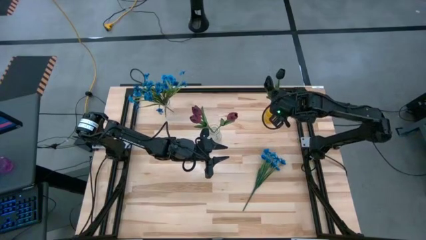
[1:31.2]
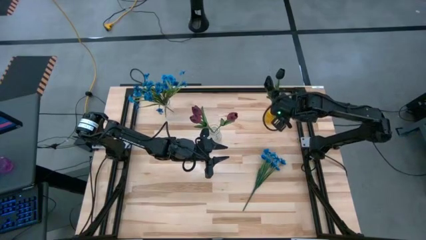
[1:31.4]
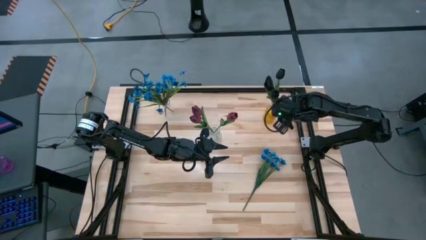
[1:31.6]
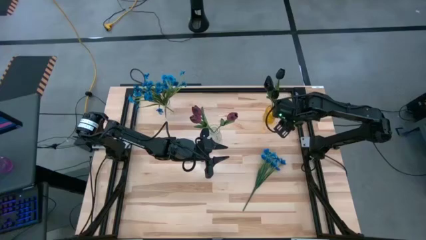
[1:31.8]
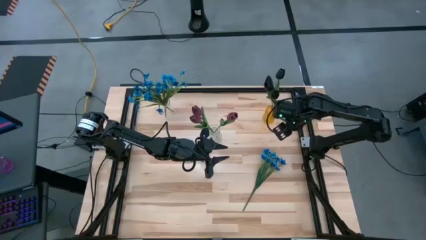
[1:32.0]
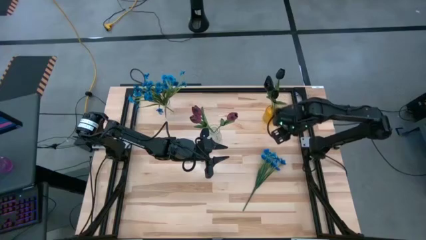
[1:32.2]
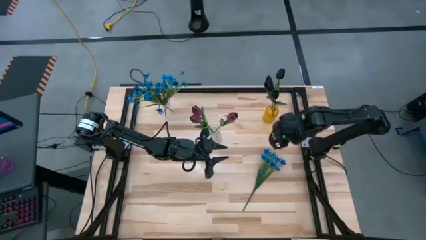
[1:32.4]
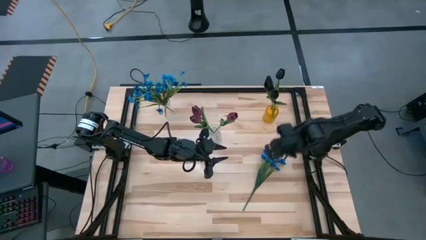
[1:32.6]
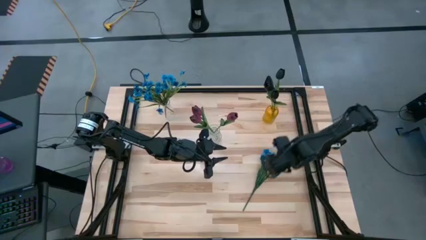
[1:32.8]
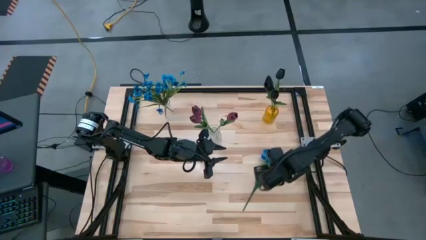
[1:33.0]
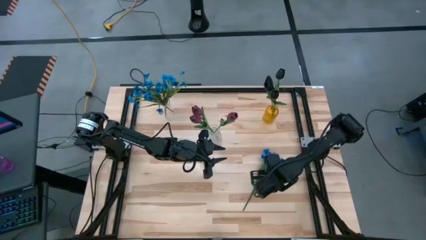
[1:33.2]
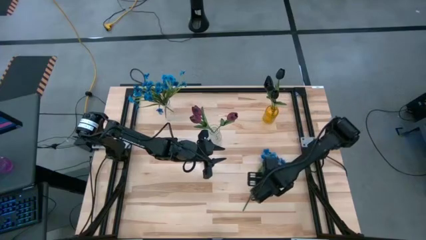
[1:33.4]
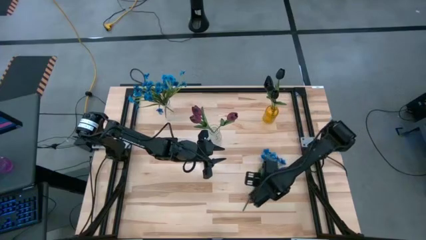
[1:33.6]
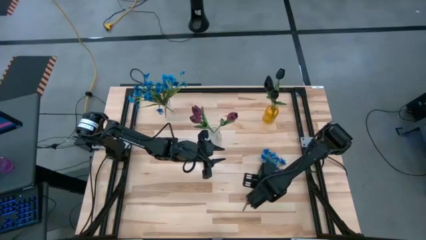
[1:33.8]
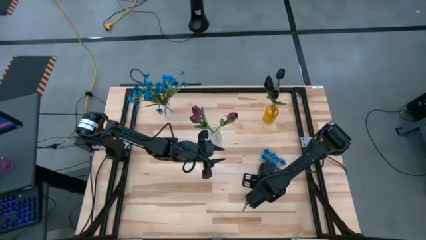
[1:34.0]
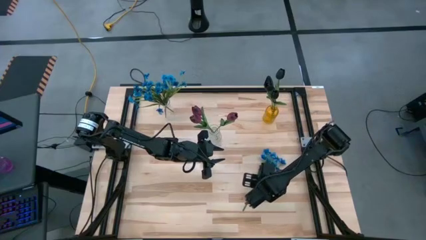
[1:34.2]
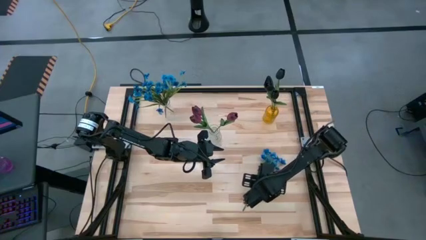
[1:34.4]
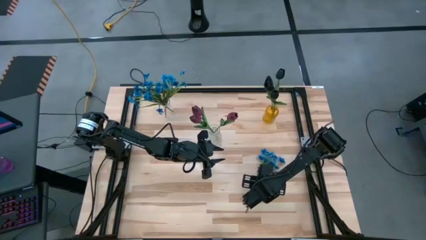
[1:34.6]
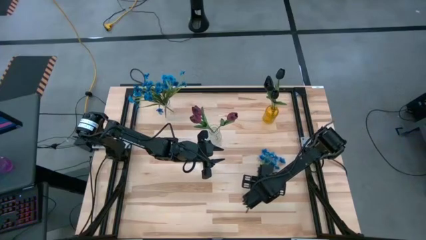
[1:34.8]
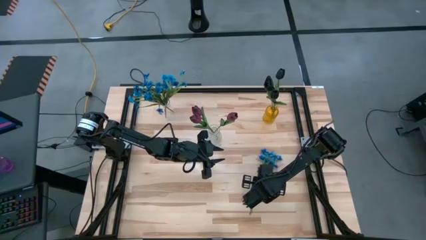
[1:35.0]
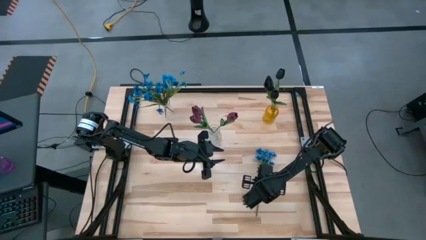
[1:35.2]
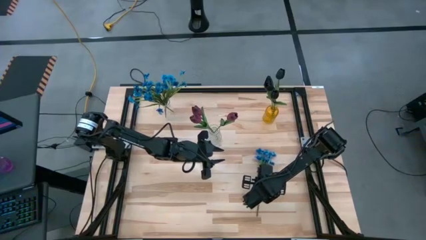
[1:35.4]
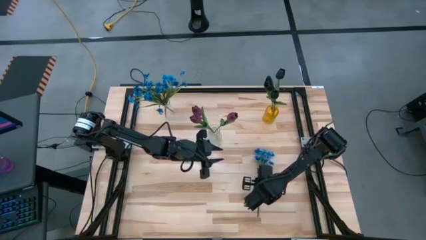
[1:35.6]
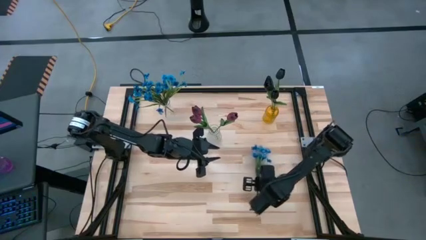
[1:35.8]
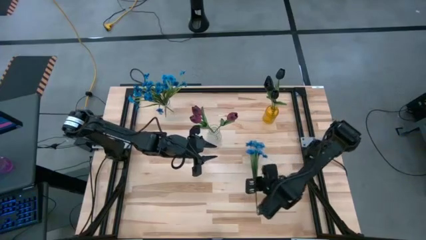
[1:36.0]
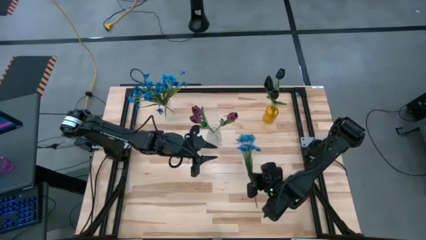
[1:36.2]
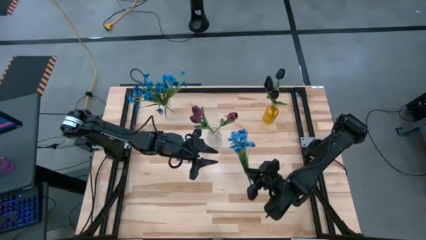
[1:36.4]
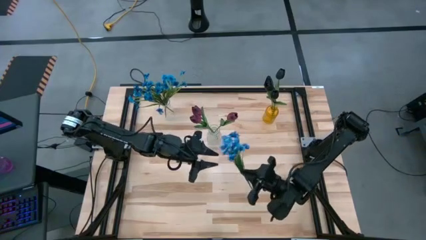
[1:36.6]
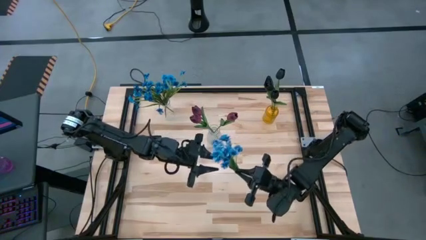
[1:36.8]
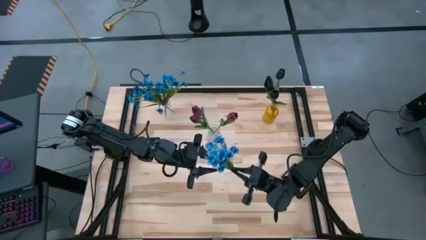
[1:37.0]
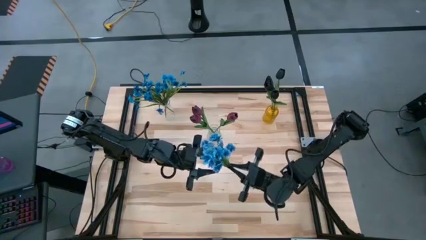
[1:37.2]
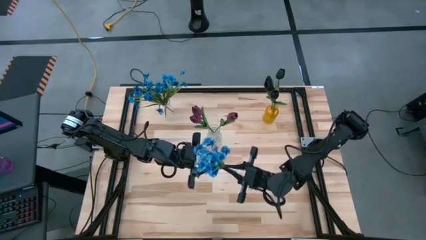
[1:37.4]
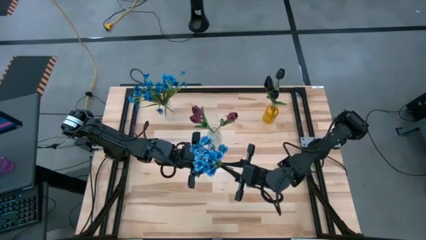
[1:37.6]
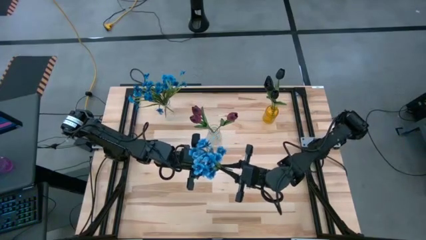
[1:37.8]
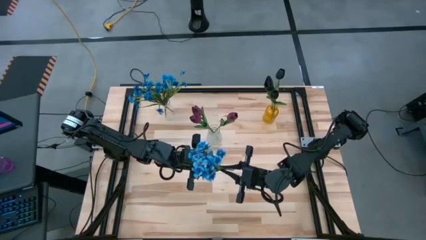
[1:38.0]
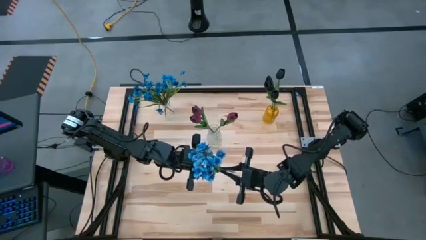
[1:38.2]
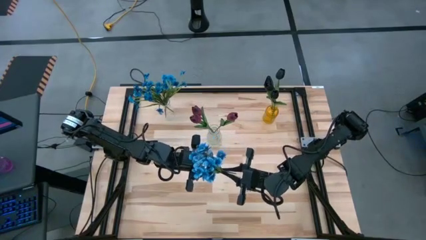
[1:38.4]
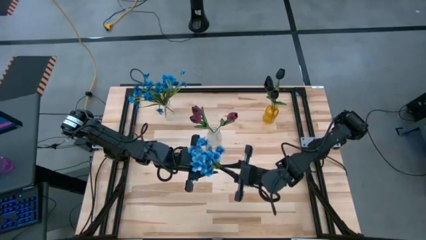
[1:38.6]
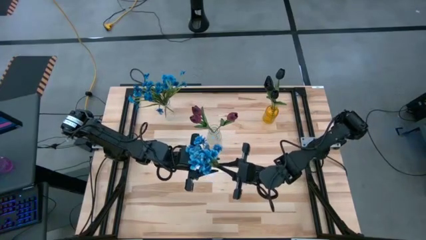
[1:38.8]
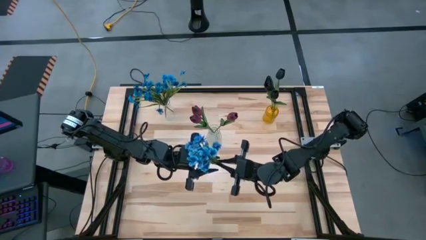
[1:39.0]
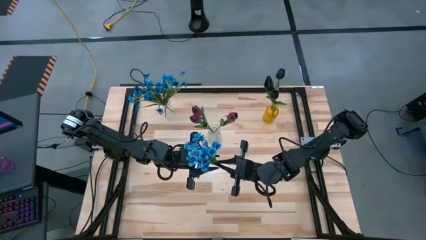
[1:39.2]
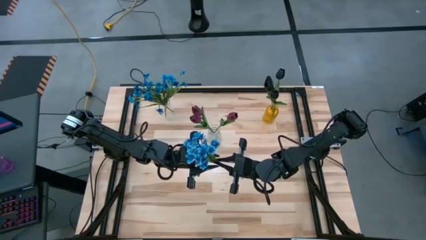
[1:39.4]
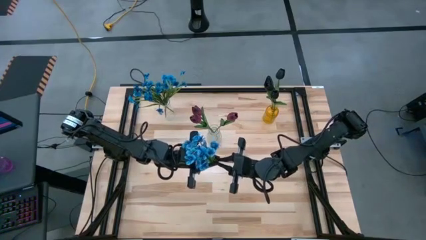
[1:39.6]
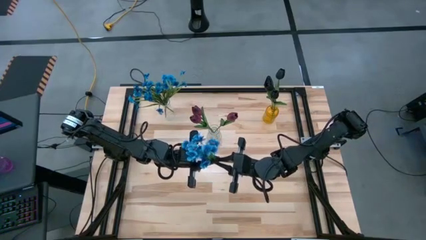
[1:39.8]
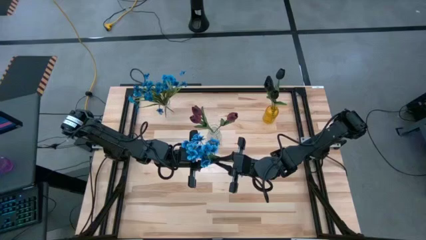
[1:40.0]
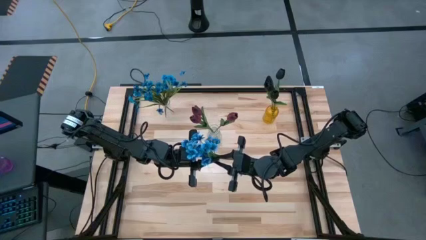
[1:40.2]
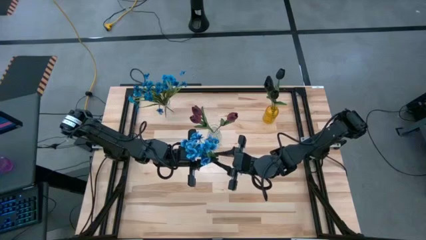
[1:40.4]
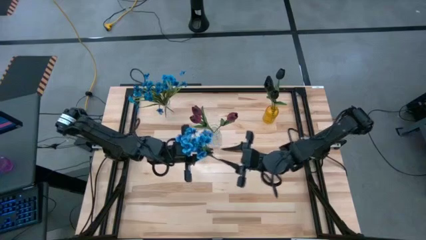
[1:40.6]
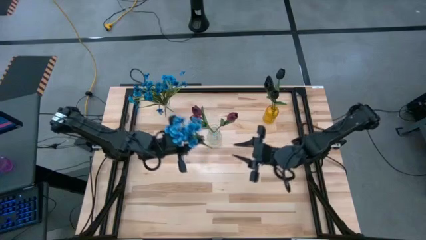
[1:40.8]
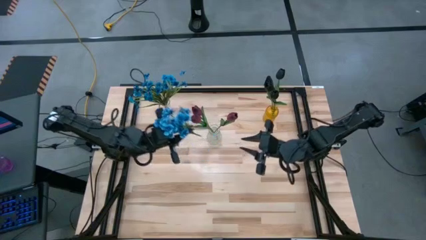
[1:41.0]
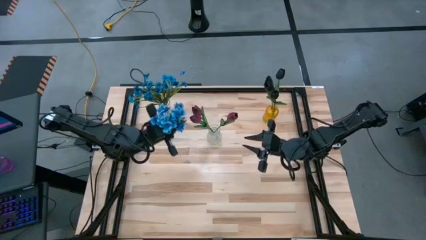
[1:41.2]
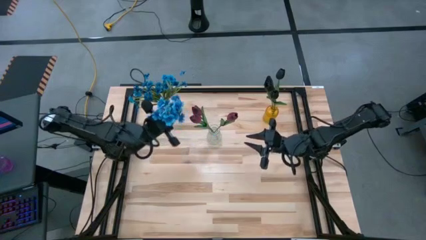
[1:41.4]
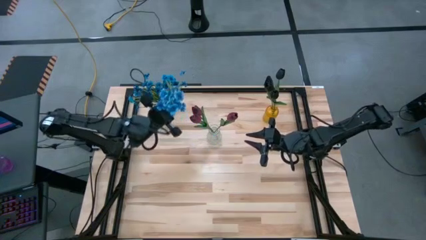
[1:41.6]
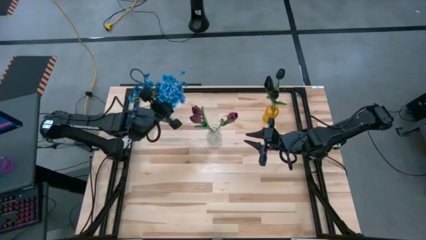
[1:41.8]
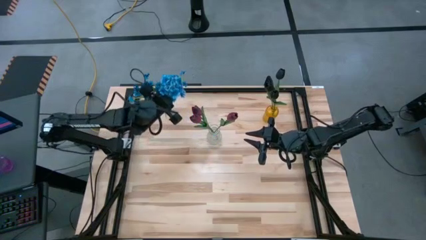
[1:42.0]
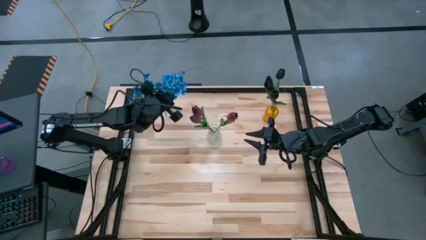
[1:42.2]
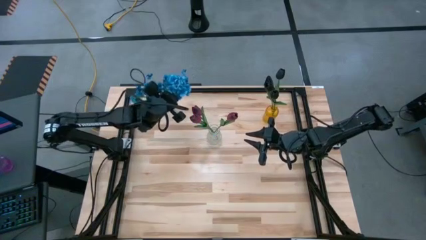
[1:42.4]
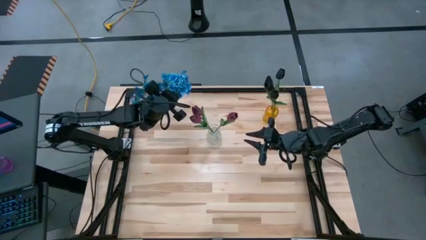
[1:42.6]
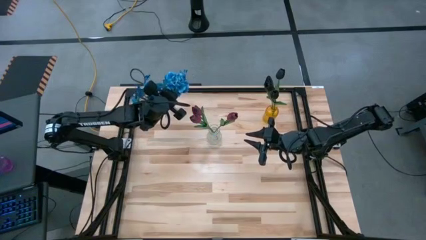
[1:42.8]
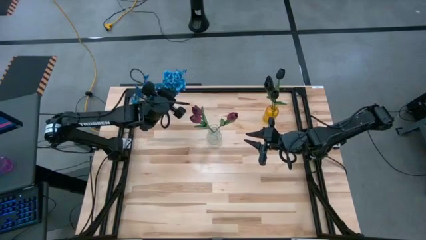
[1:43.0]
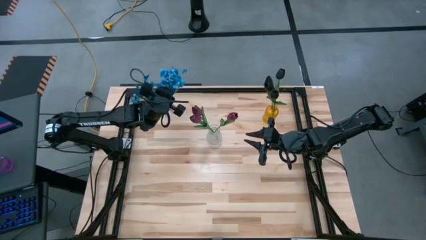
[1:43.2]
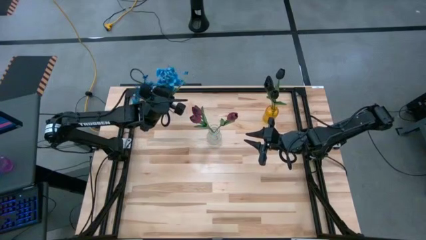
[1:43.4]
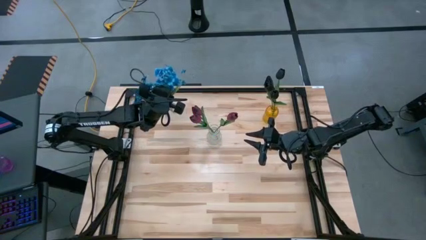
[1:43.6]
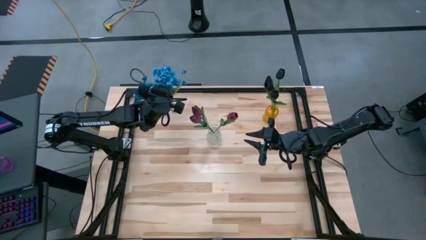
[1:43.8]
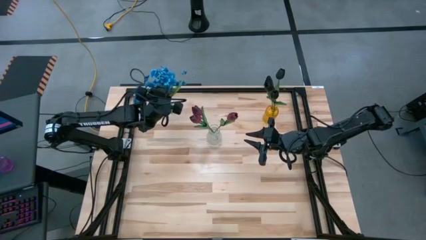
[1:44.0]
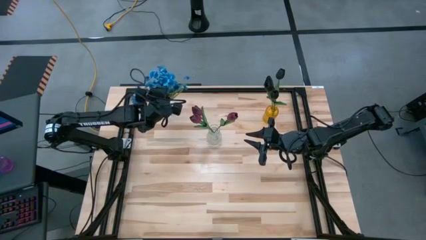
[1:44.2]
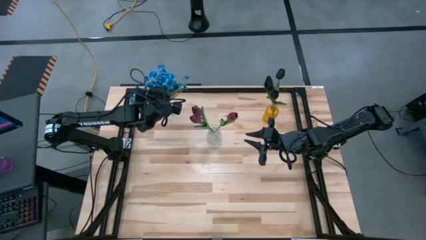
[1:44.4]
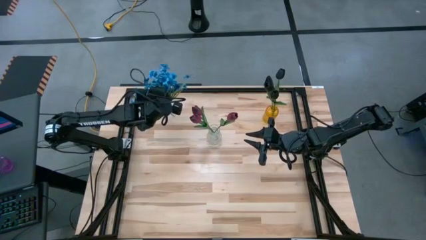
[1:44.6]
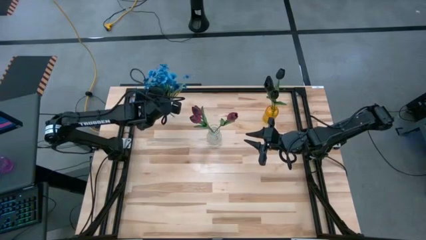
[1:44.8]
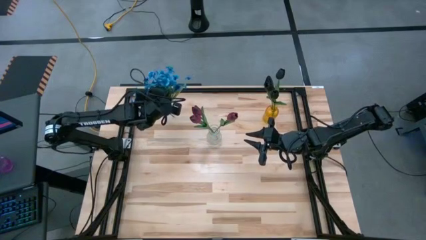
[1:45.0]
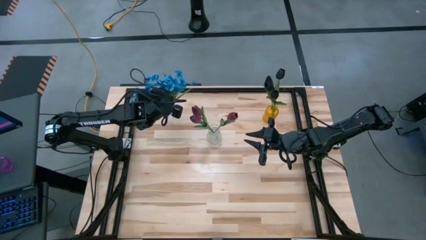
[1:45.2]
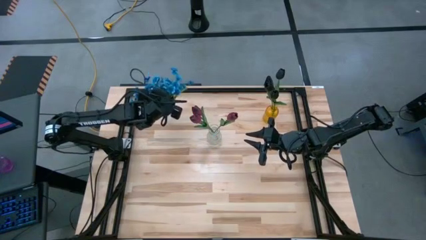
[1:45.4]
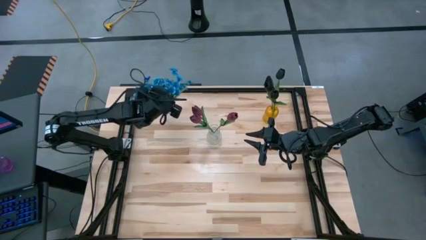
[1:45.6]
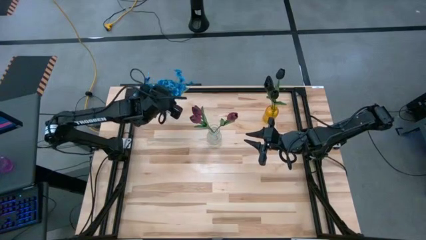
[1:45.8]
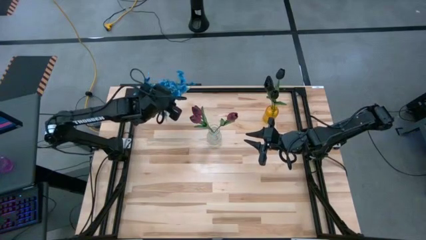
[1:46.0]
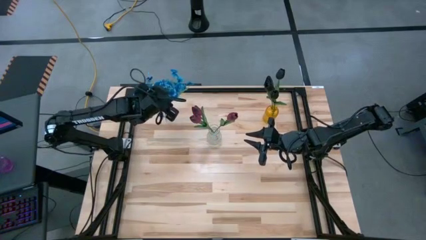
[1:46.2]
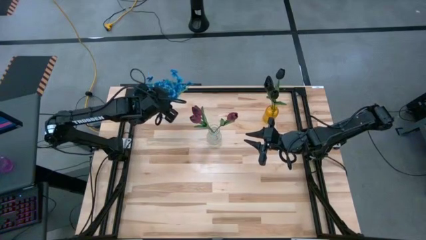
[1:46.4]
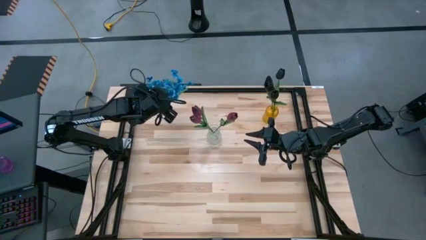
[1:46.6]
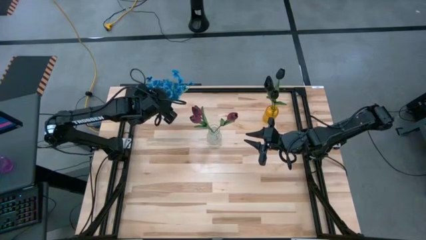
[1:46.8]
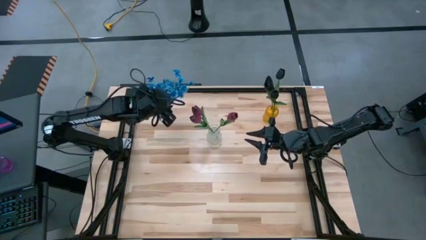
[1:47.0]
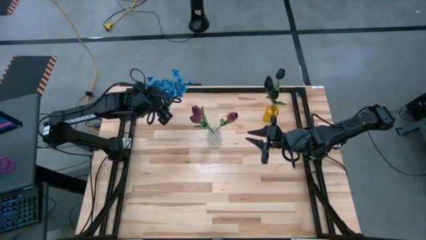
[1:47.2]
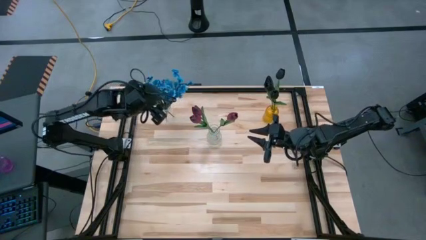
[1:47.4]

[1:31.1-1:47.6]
Task: Sort flowers into vase by color
Put the blue flower into the top transparent vase
